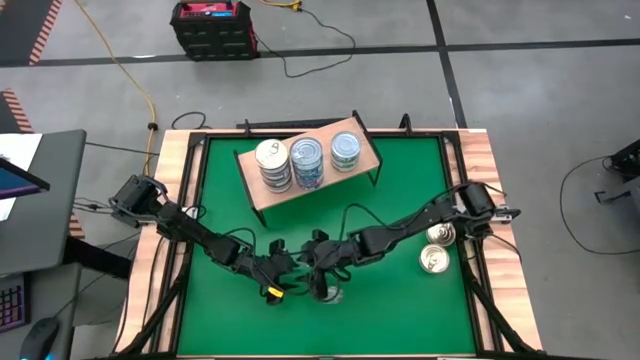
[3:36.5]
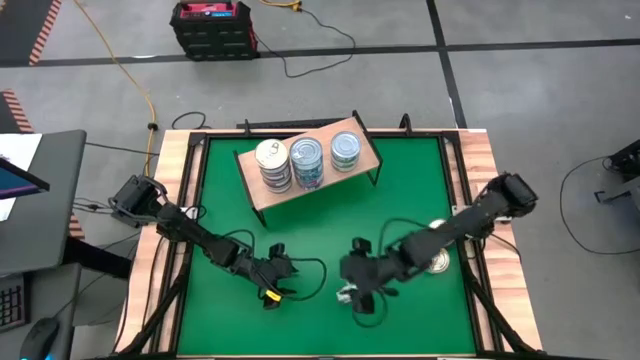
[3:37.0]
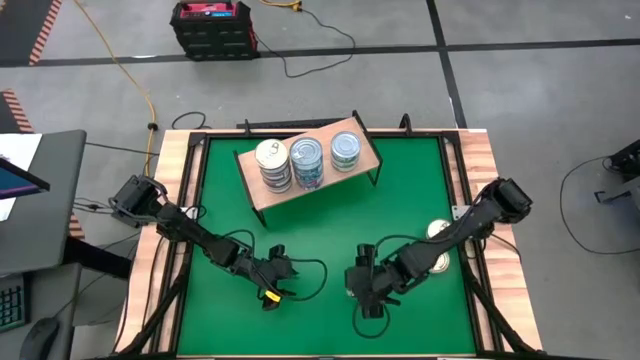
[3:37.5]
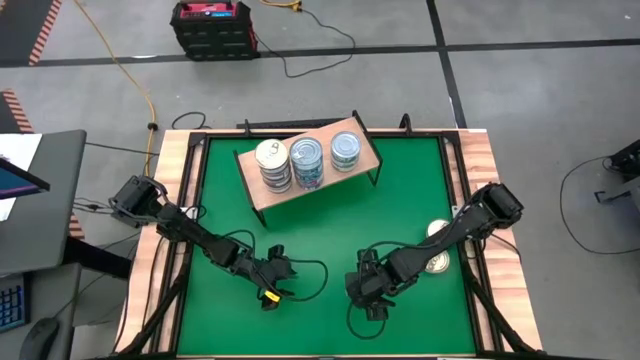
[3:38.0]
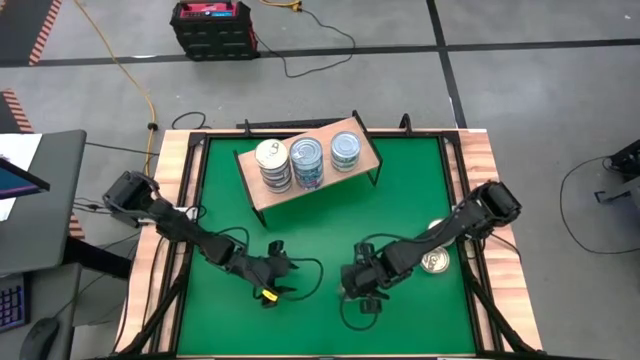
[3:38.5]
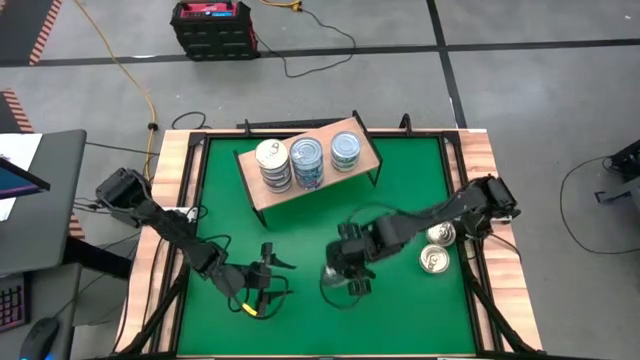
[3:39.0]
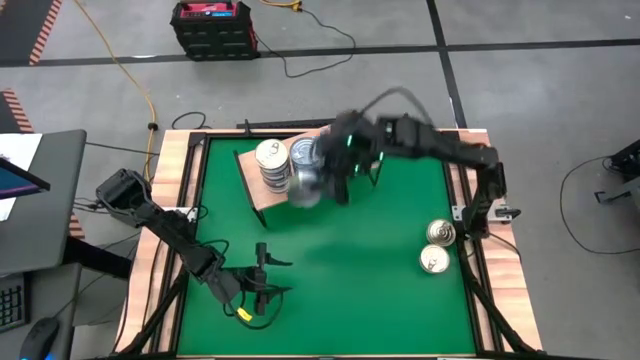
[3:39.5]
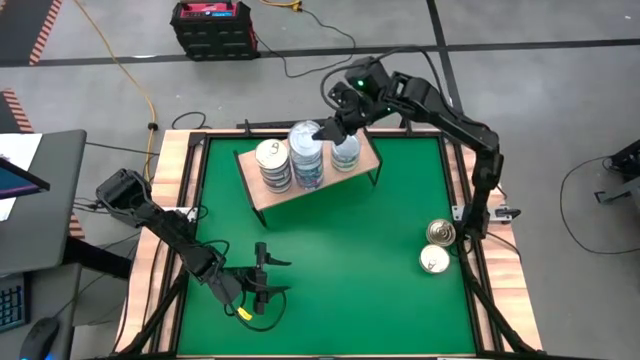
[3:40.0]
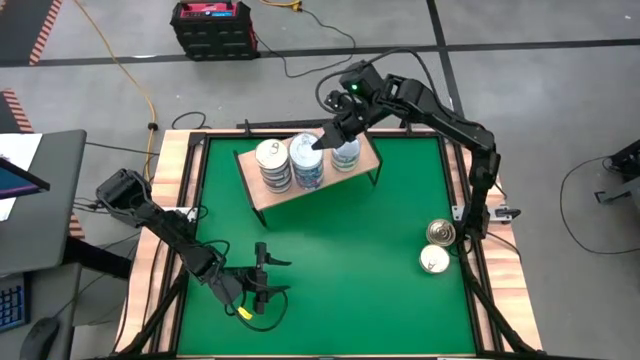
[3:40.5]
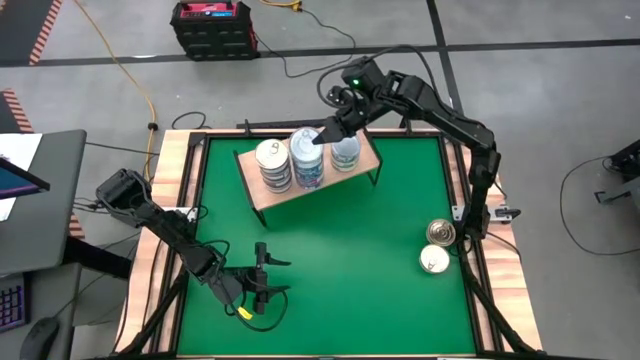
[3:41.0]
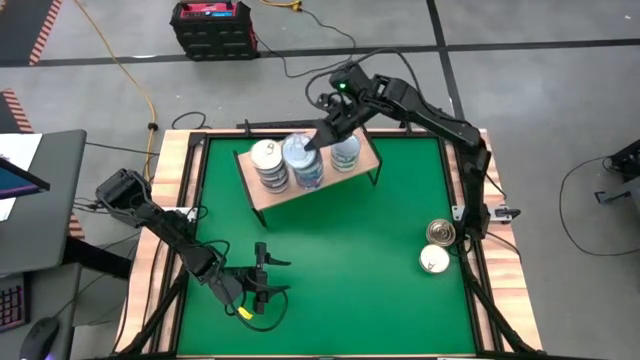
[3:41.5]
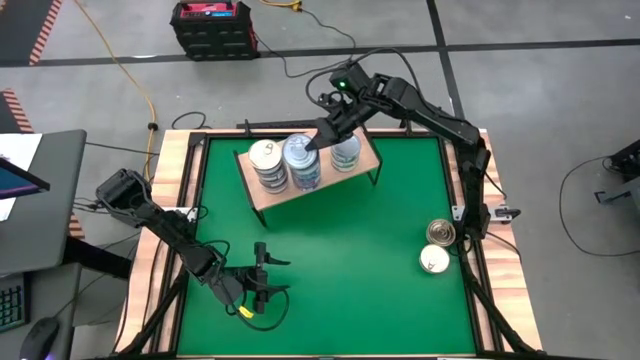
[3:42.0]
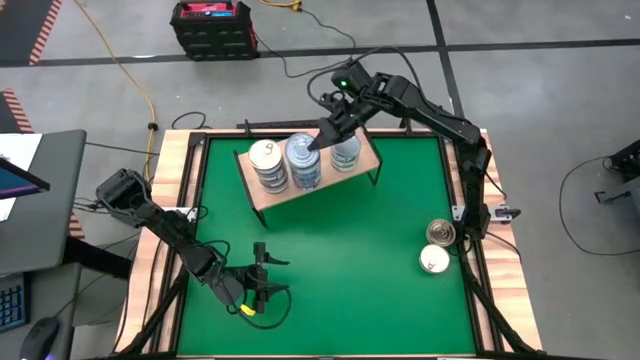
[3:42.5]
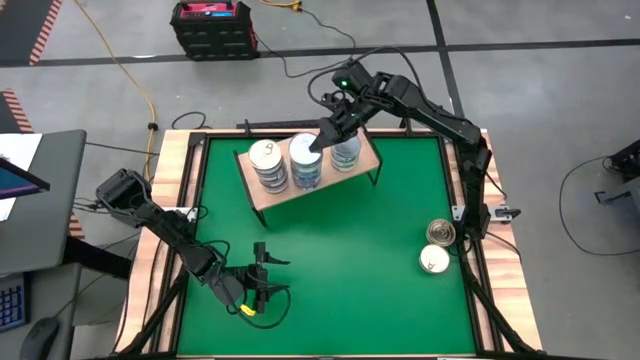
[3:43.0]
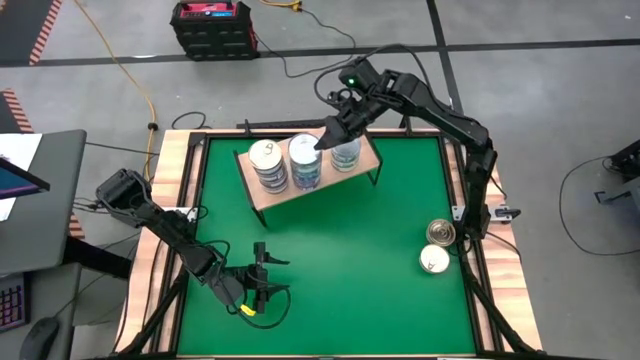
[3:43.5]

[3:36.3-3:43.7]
Task: Stack canned seafood by type on shelf
Stack the green tuna can on top of the yellow blue tuna can on the shelf

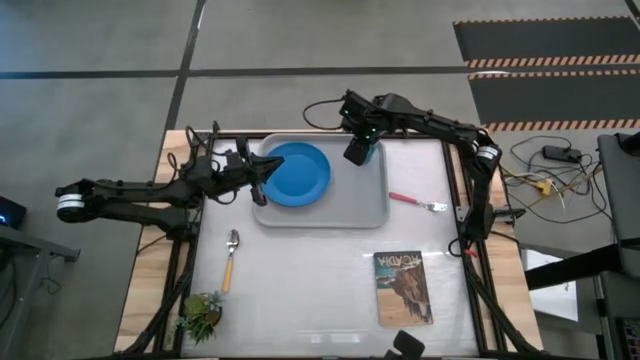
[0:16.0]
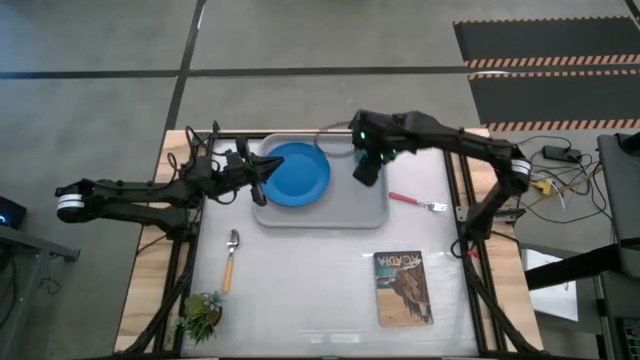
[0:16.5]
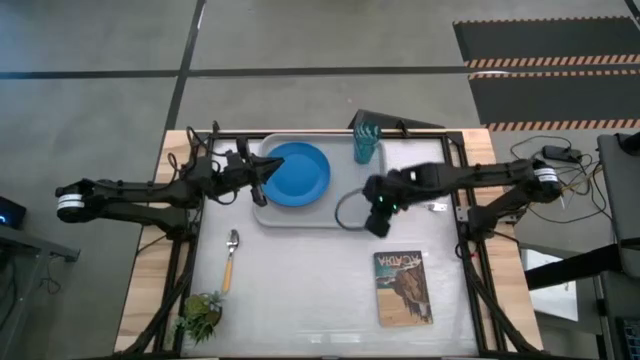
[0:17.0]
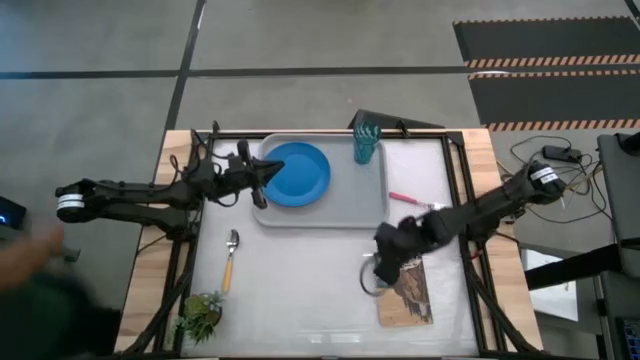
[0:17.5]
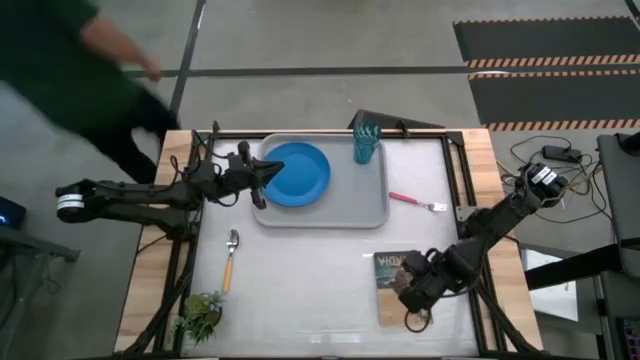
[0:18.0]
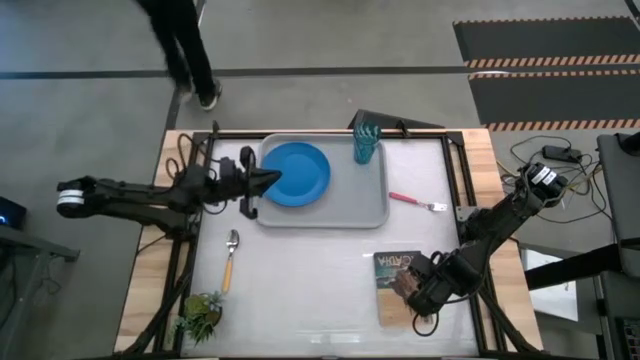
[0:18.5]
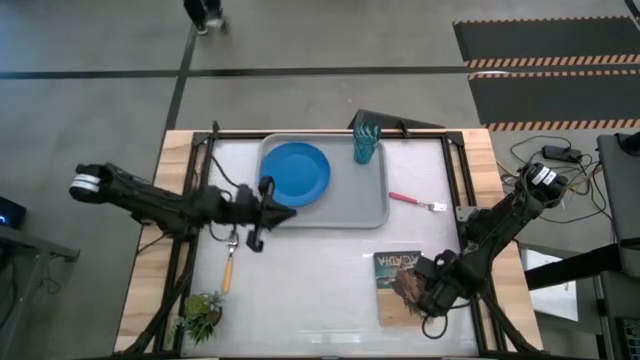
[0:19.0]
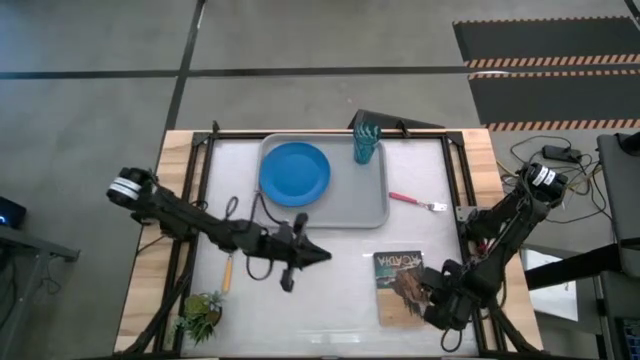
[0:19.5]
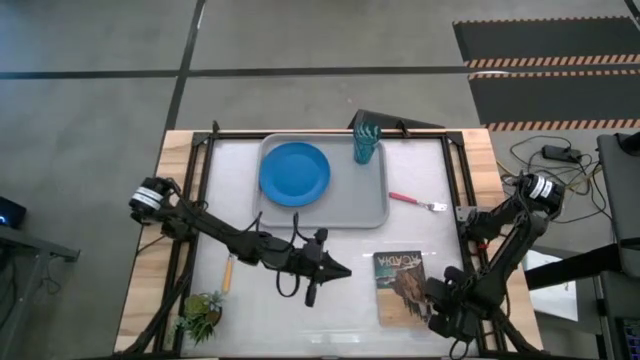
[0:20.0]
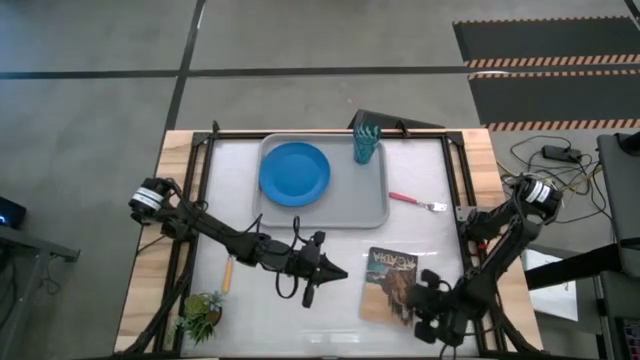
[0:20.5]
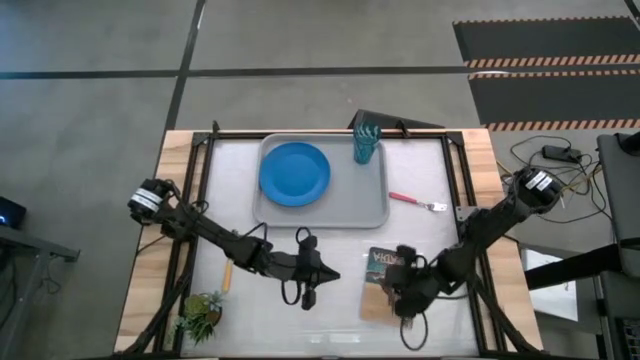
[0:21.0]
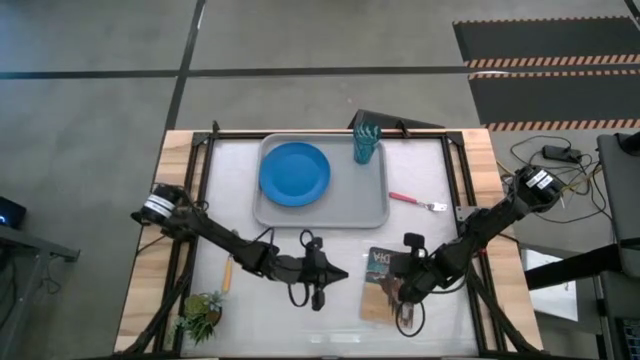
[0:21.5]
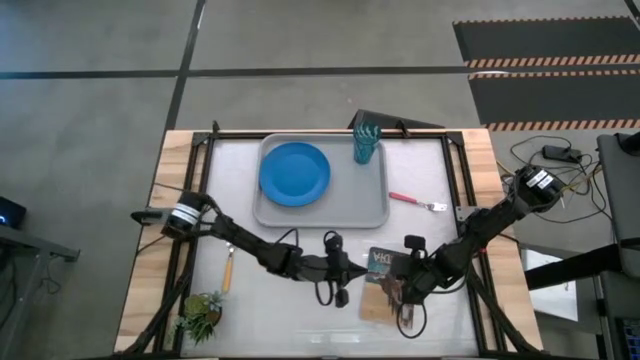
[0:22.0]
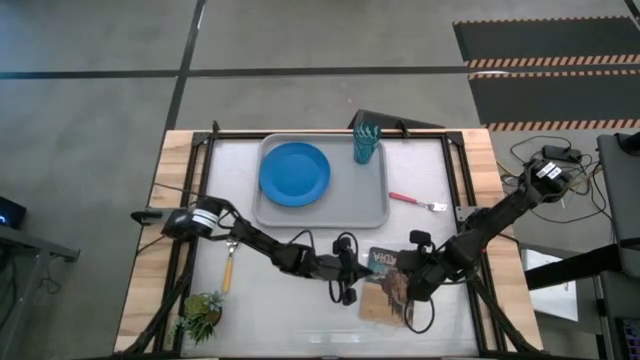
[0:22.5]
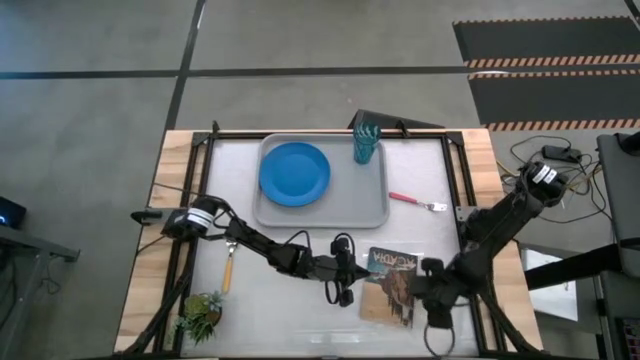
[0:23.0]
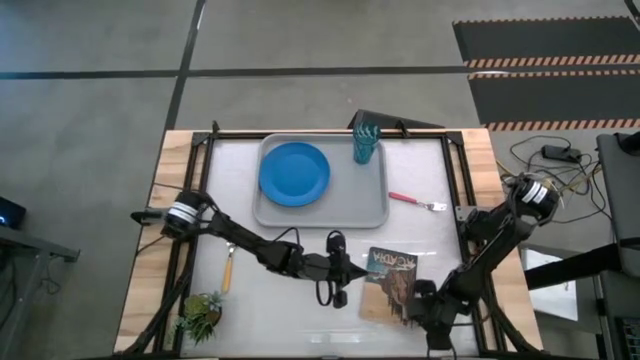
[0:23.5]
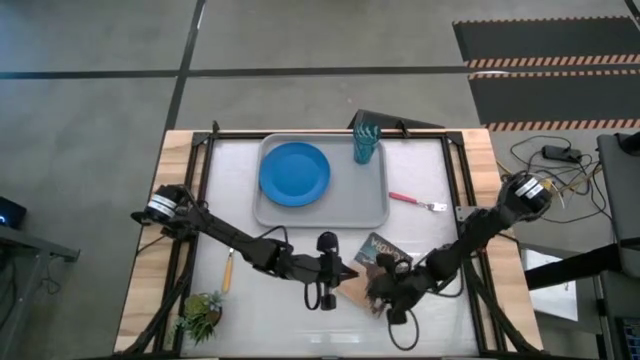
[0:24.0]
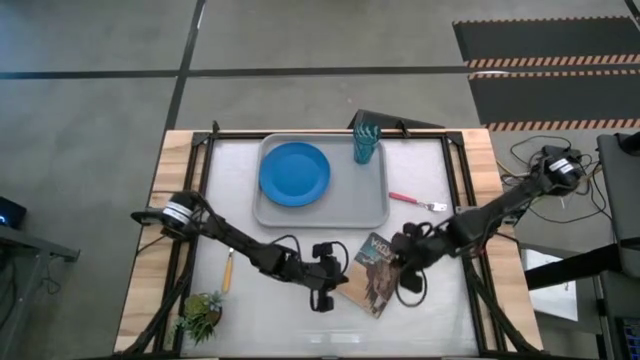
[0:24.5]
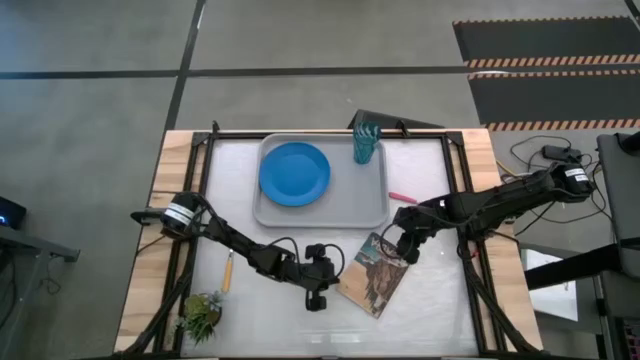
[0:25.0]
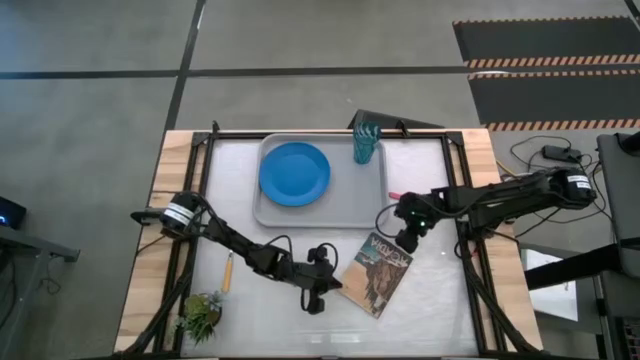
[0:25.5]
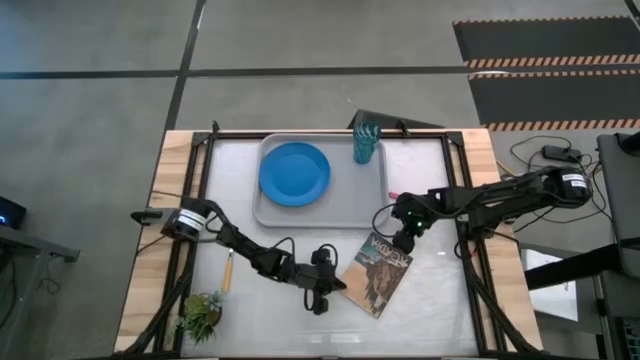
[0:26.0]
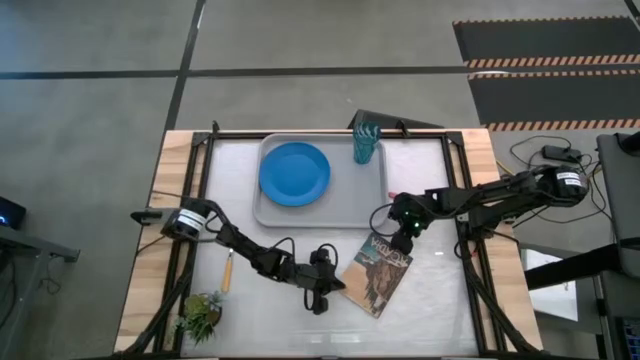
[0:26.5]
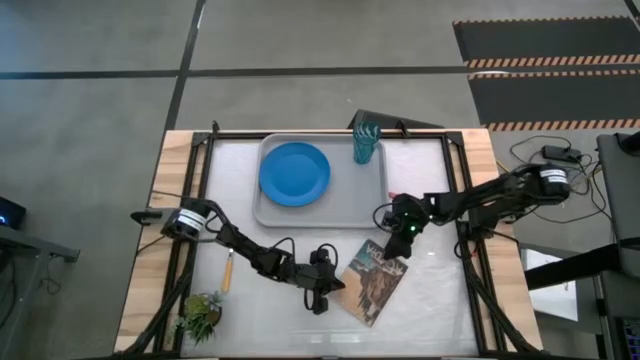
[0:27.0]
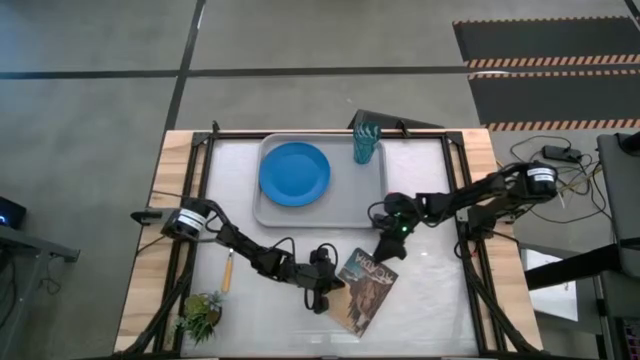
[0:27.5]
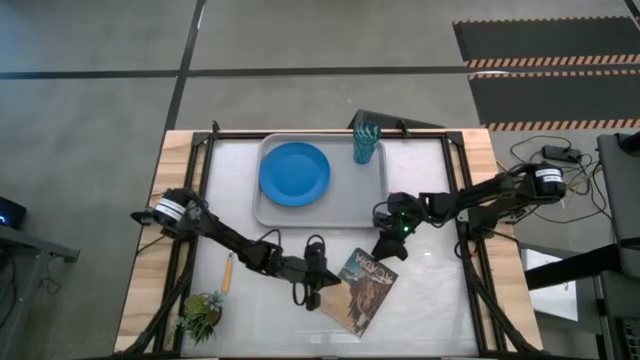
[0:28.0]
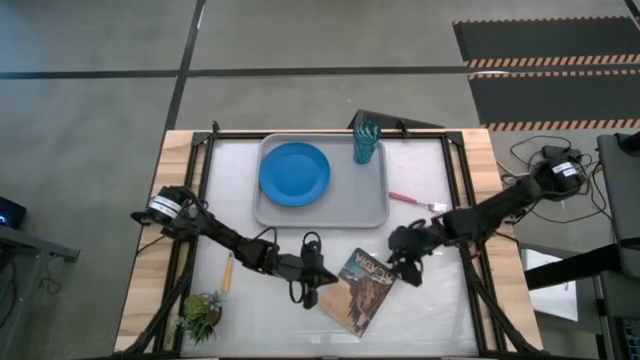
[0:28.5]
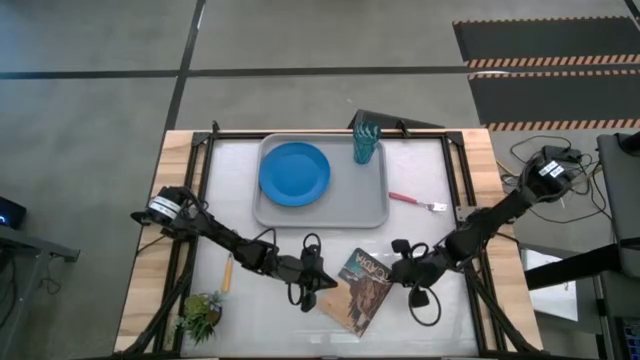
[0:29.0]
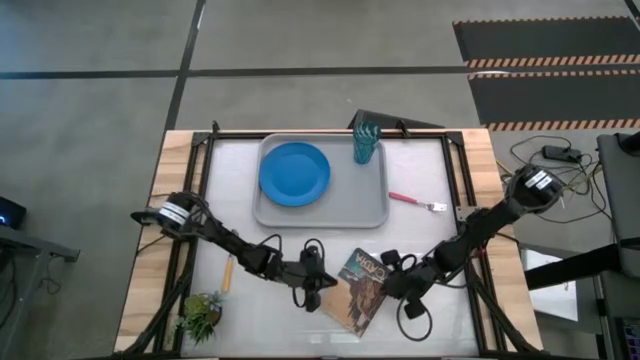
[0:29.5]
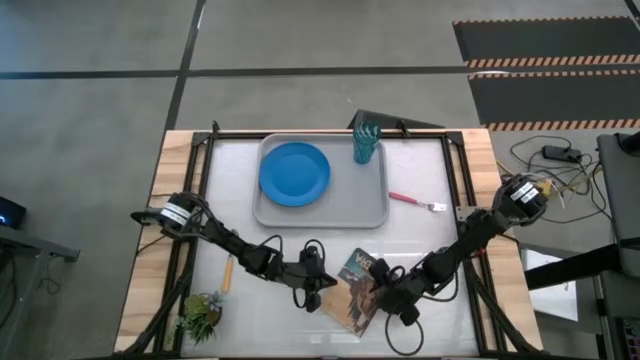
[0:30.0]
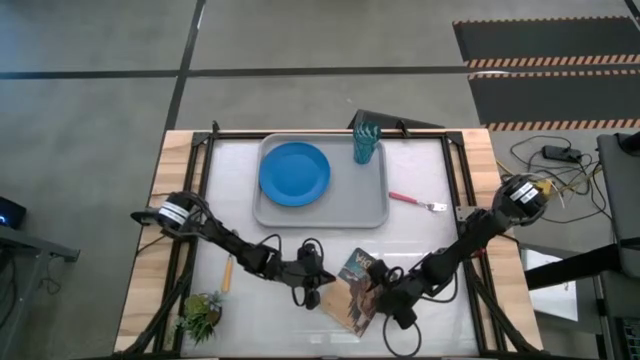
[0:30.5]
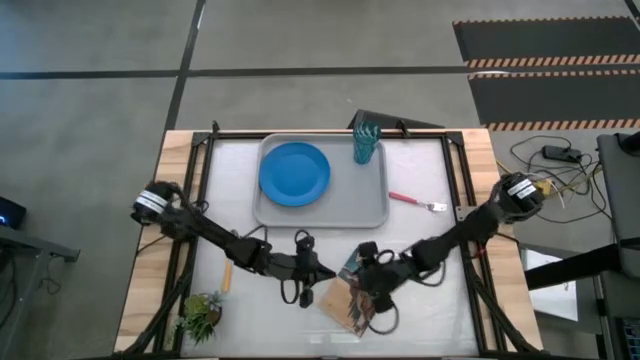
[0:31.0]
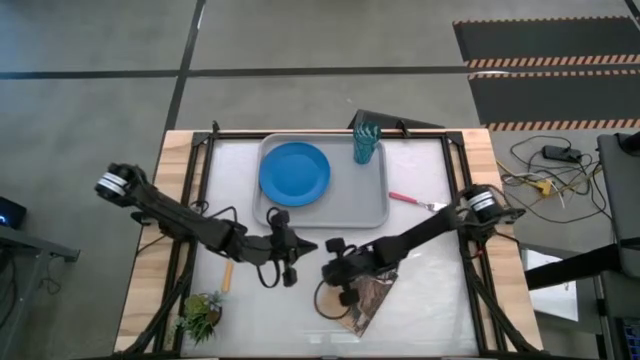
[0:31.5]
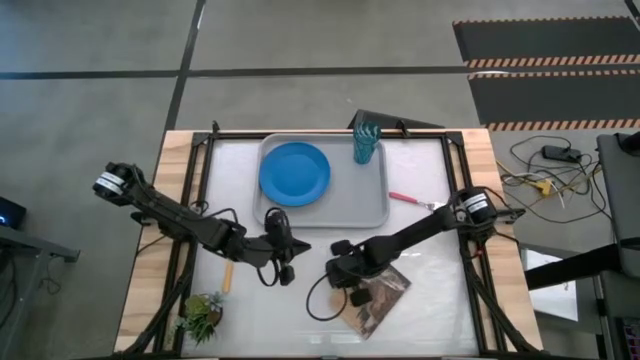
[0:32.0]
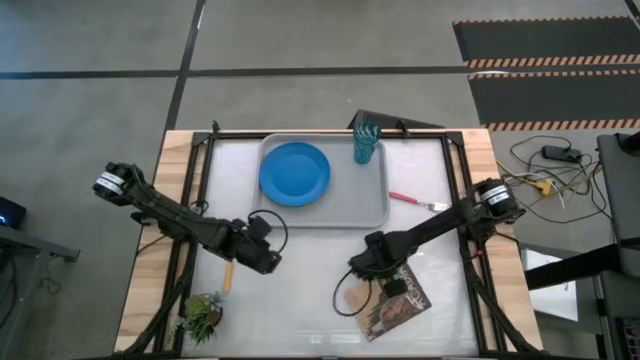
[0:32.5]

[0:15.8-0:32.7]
Task: Pick and place plate/cup/fork/spoon on tray
Adjust the brown book
